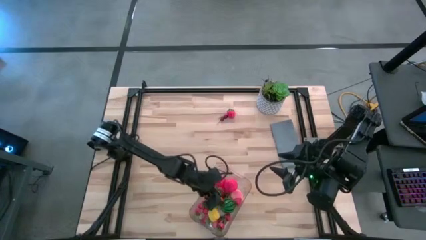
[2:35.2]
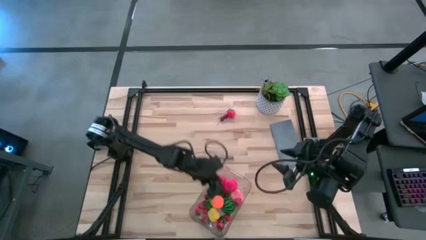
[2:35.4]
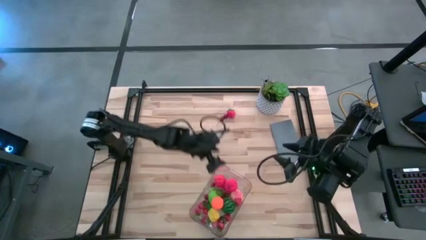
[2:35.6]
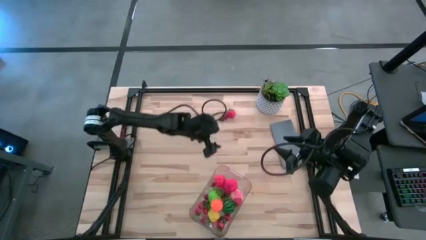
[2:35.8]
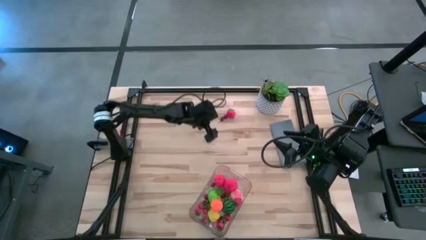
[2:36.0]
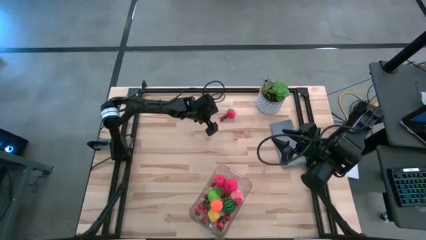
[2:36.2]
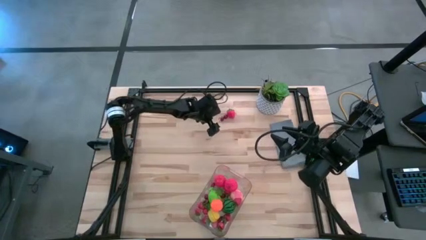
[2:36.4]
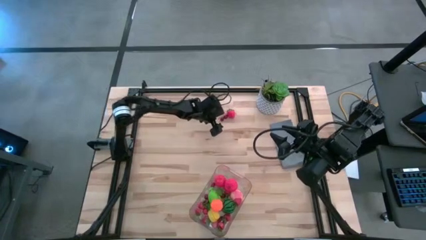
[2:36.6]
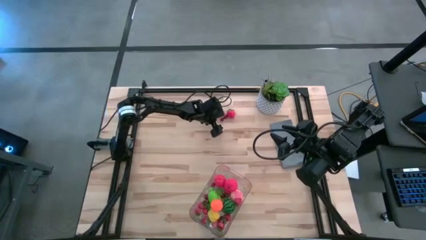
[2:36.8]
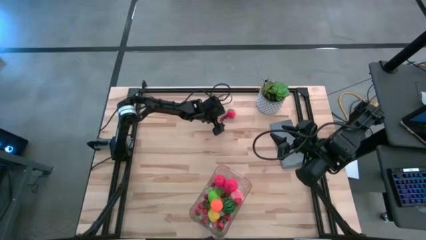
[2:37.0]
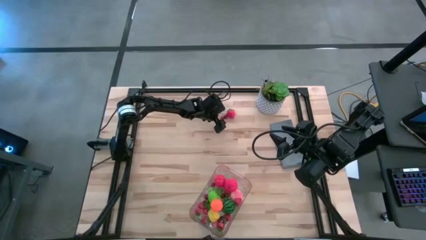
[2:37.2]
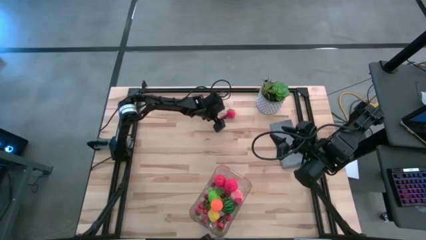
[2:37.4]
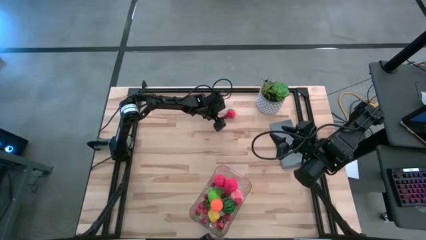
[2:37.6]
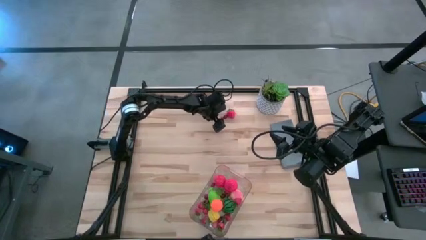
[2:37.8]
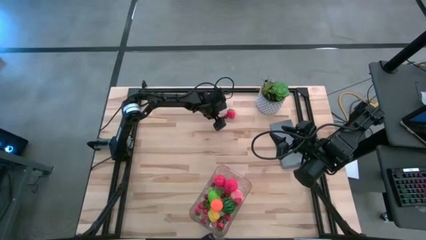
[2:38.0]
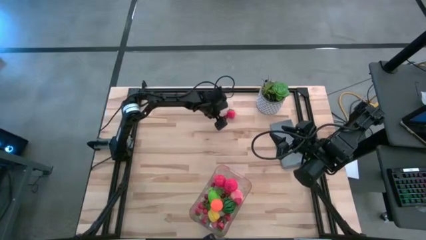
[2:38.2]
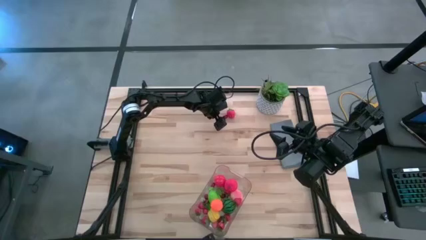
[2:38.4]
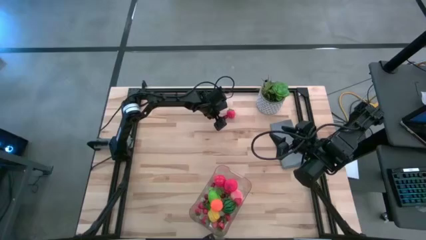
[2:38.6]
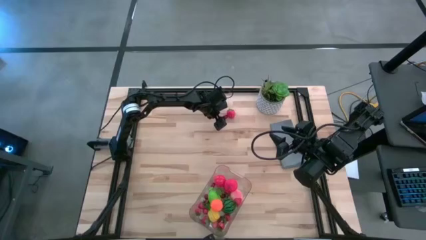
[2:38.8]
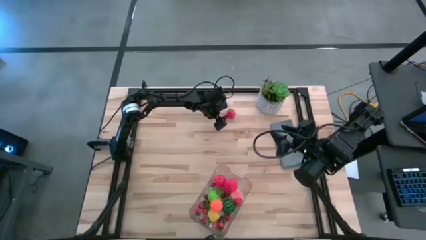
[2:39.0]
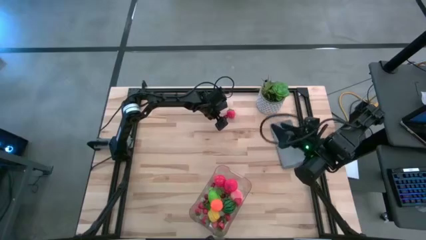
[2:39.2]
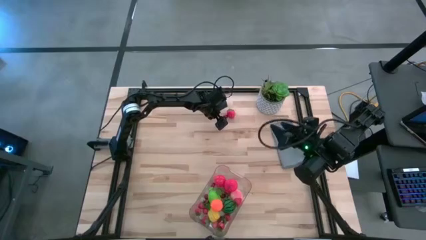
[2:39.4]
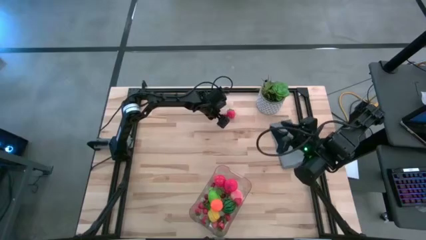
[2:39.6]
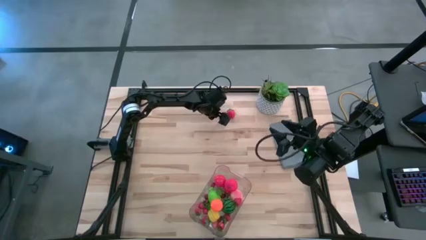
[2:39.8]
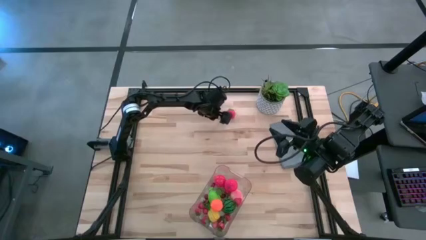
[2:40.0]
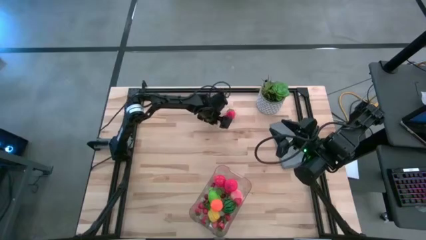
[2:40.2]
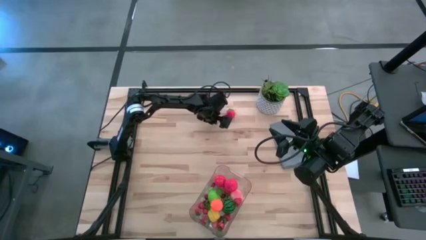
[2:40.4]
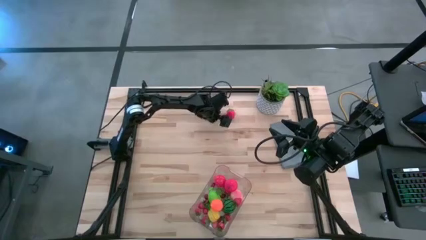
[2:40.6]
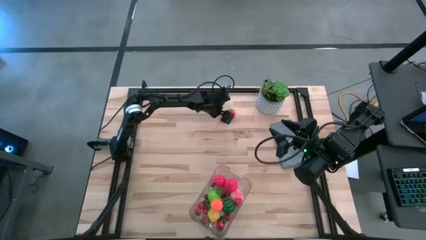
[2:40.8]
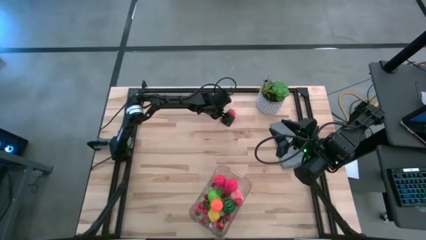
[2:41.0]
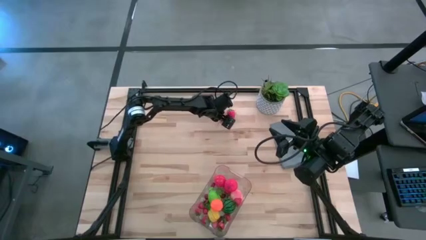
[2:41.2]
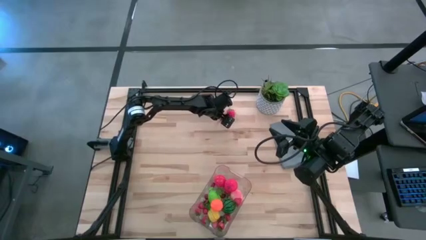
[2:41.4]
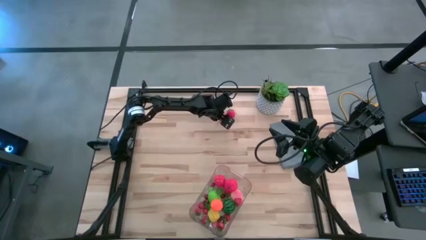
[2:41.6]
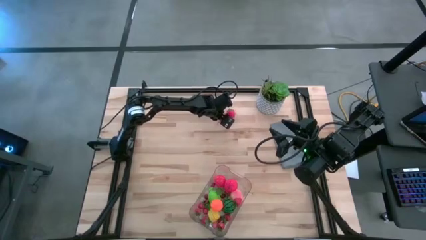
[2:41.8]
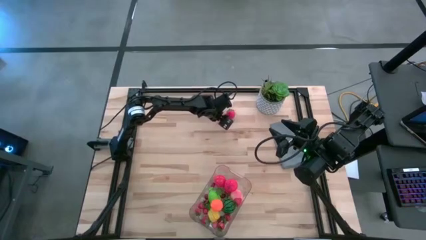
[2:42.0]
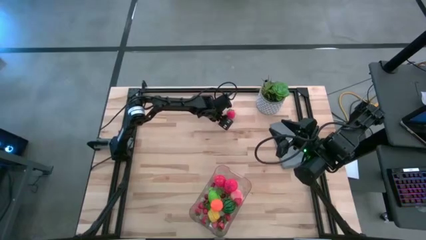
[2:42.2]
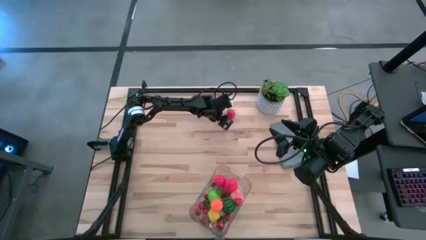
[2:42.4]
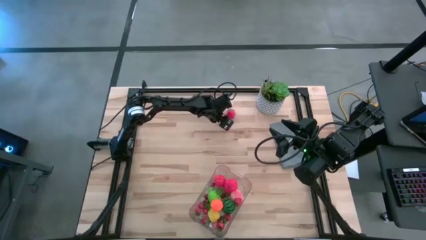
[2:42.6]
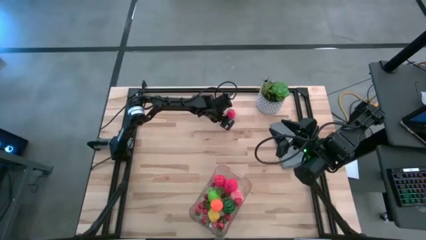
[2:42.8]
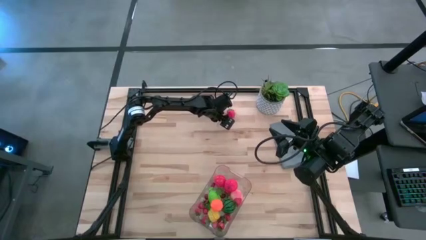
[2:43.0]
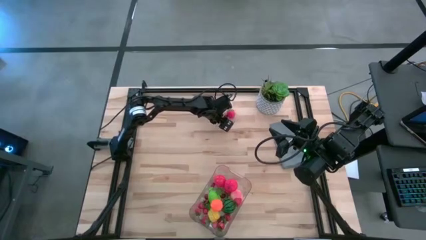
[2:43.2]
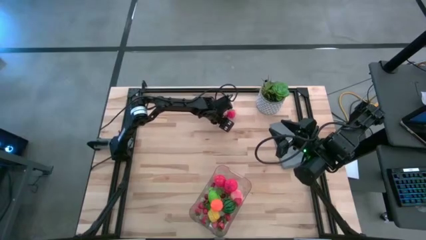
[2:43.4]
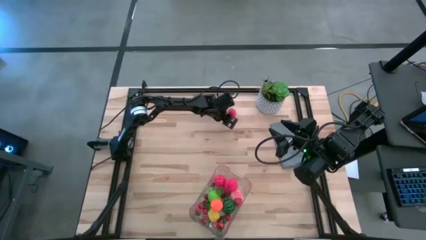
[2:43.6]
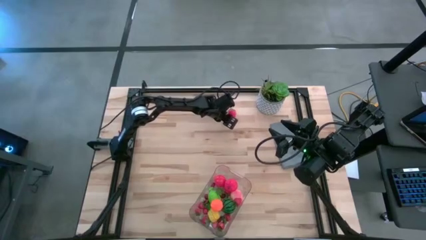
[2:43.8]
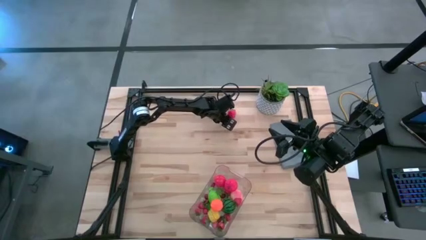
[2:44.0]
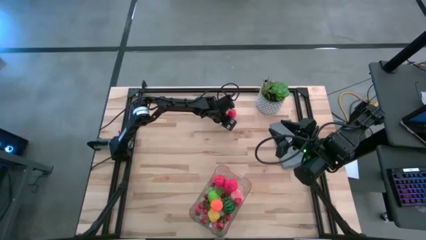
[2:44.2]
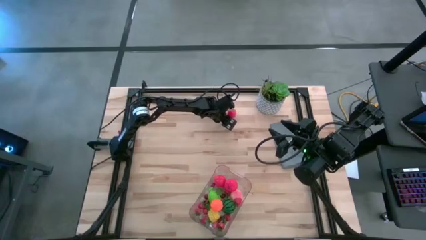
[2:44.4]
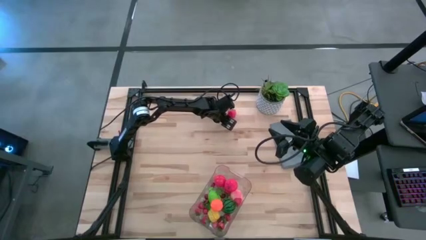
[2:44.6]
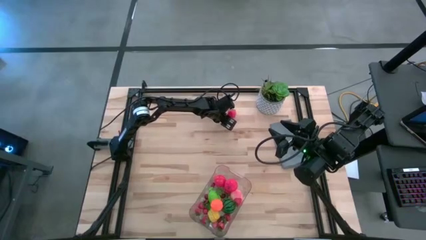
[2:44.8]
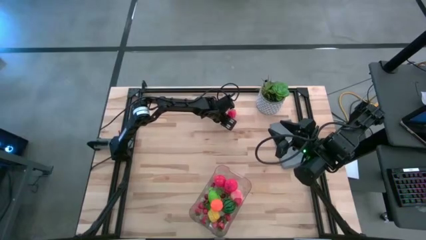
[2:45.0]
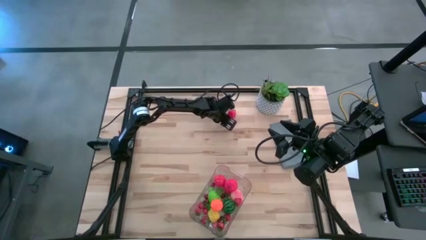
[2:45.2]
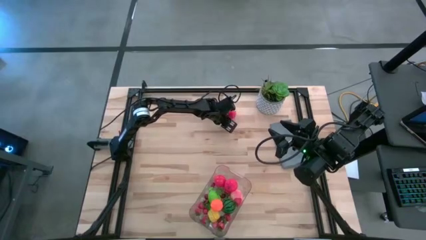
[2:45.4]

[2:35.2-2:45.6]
Task: Pick and placing Produce into tupperware
Put the red cherry into the transparent basket

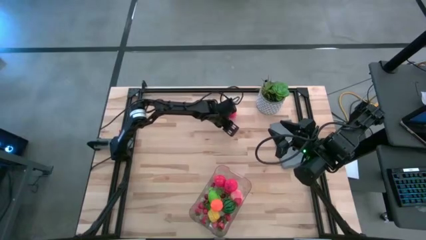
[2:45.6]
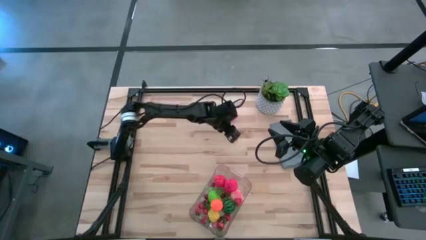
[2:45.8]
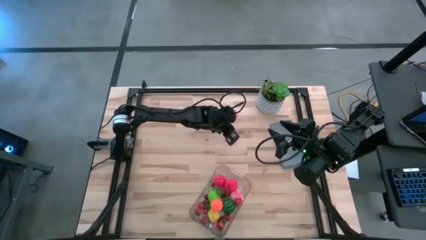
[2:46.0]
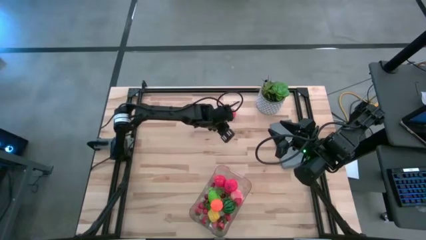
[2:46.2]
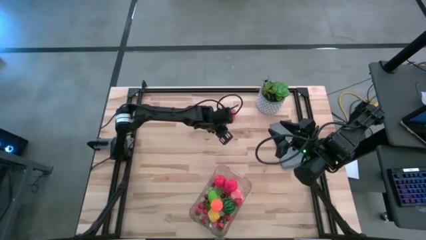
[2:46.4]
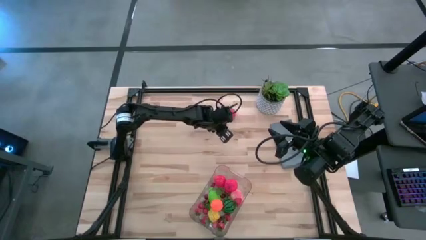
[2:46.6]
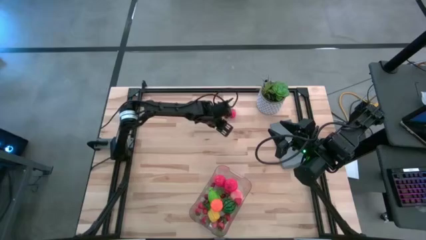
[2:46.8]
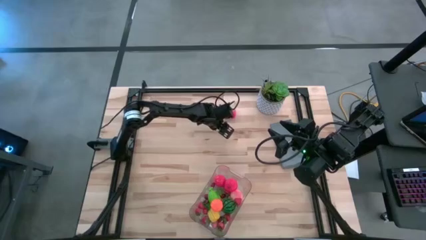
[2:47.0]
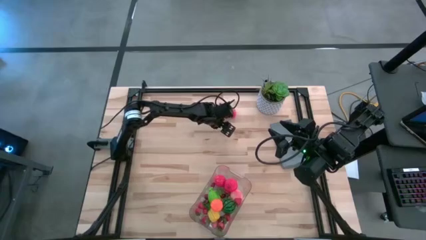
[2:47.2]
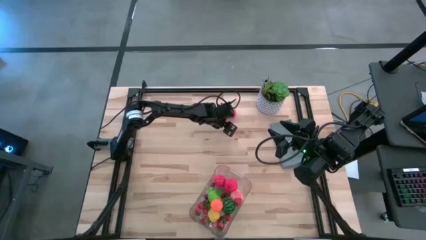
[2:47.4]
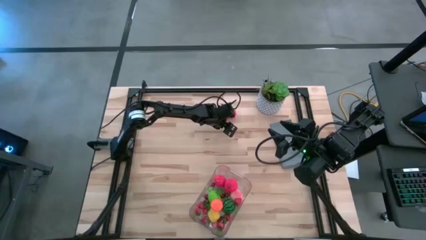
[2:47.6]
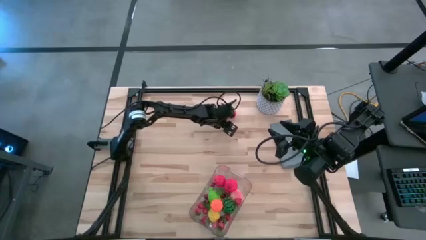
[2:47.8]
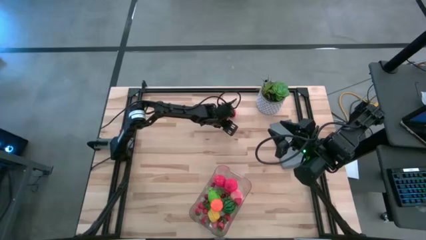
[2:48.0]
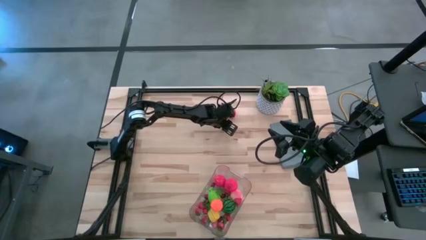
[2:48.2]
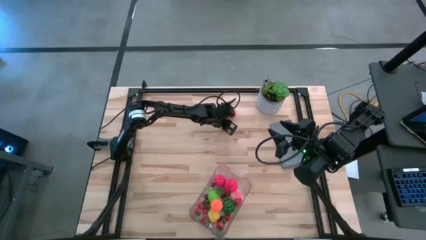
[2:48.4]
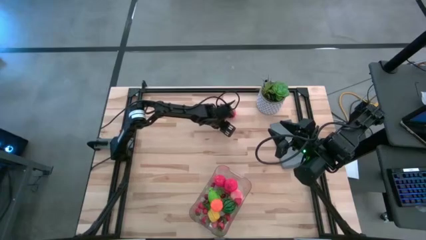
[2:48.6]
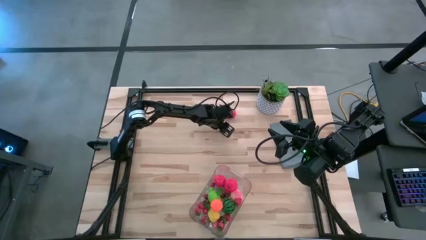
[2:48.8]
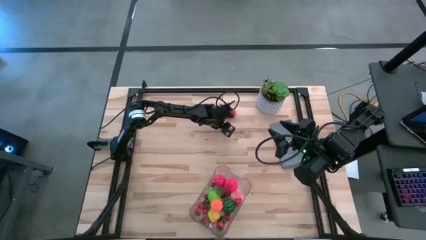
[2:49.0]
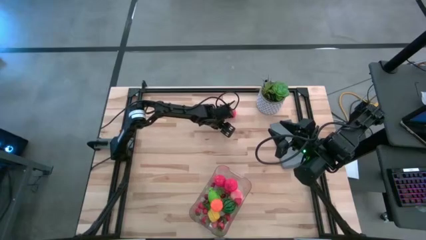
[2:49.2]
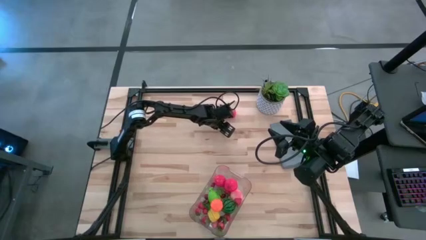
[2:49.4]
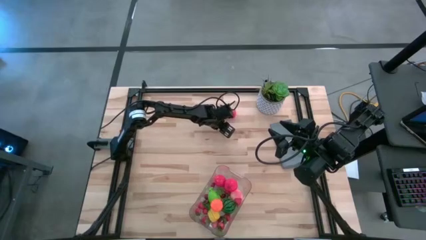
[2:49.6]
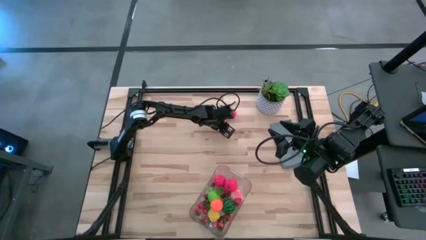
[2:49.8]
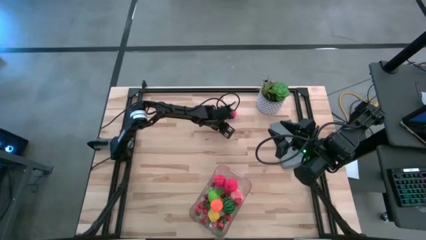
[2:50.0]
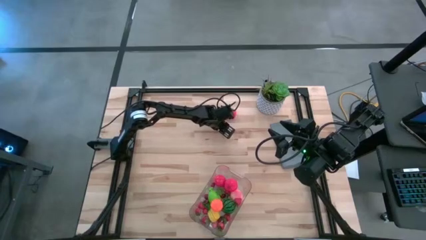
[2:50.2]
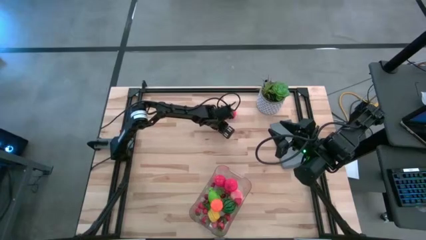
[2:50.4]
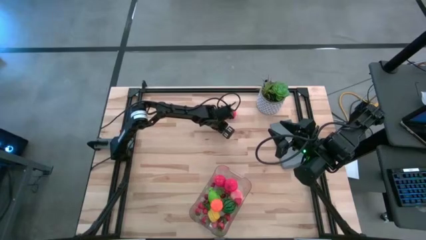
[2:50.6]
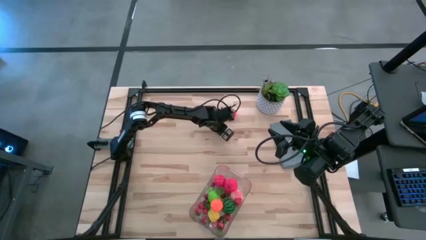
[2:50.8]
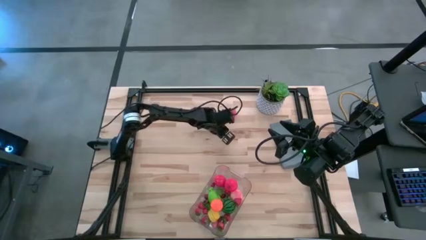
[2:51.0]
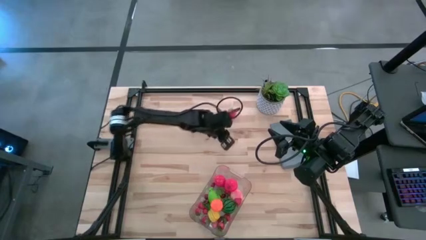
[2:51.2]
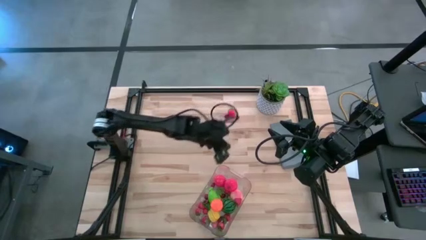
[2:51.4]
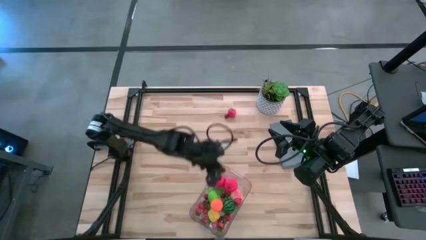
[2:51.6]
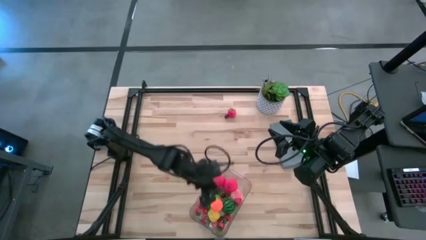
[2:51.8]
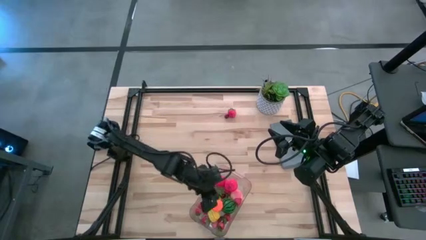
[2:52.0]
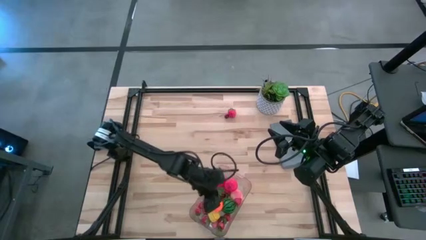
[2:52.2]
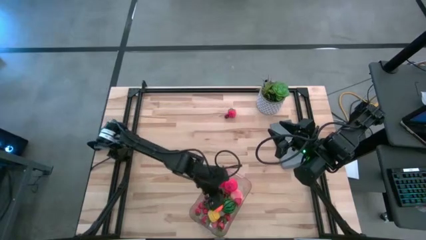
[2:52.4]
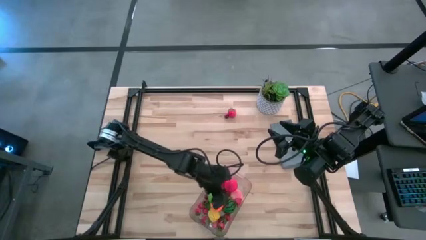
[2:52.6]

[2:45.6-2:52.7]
Put the red cherry into the transparent basket
